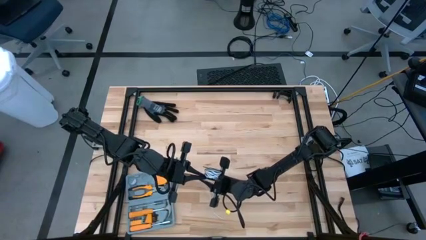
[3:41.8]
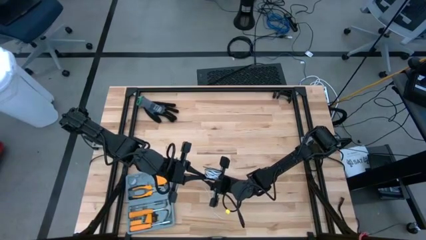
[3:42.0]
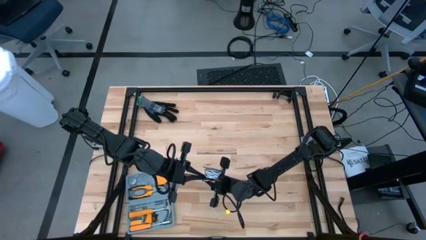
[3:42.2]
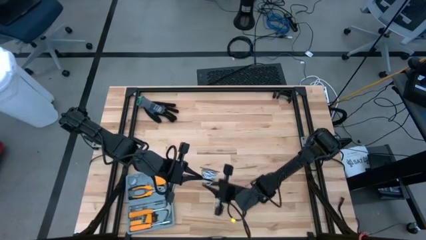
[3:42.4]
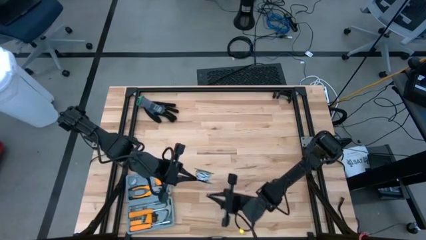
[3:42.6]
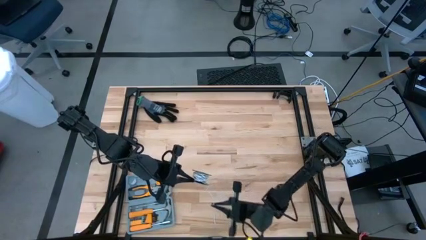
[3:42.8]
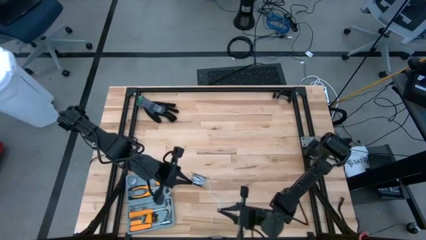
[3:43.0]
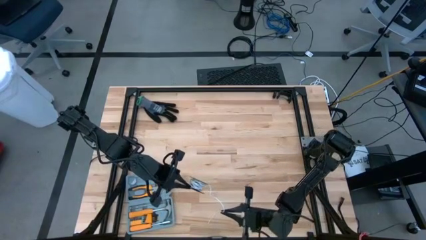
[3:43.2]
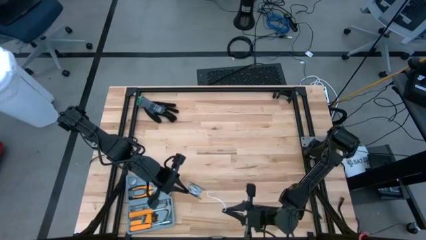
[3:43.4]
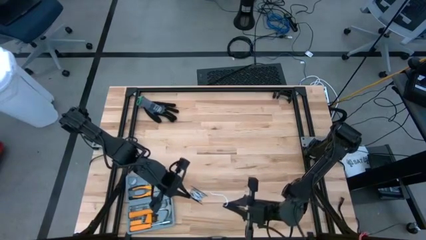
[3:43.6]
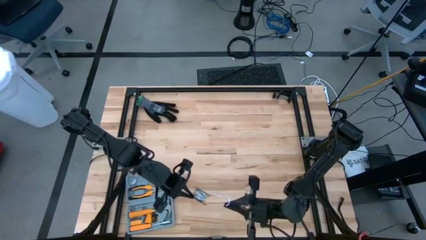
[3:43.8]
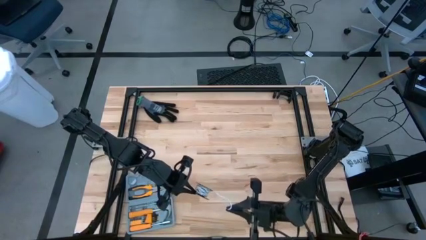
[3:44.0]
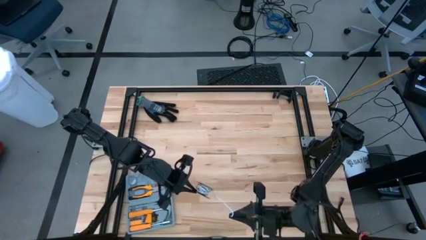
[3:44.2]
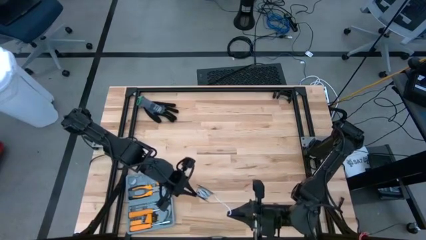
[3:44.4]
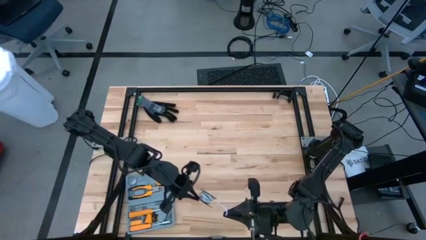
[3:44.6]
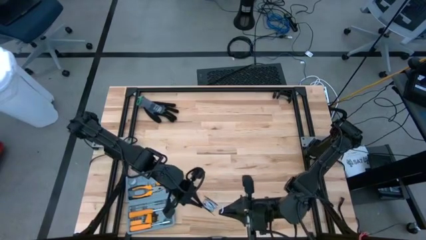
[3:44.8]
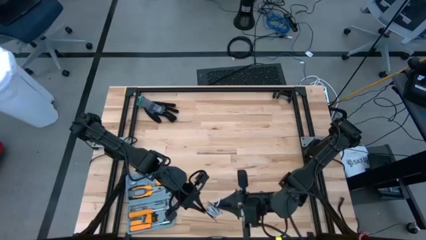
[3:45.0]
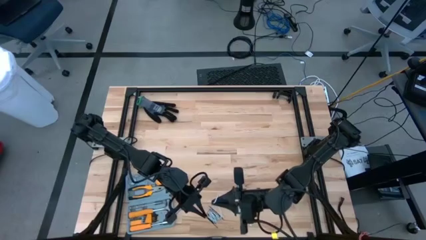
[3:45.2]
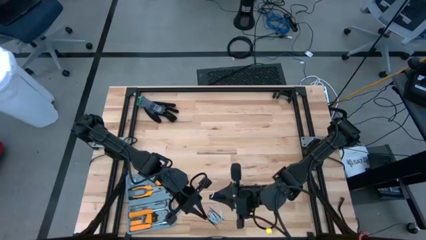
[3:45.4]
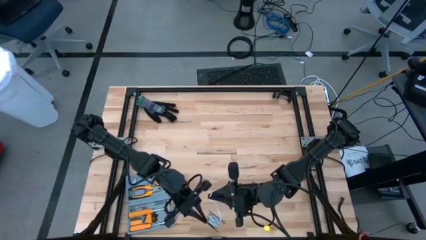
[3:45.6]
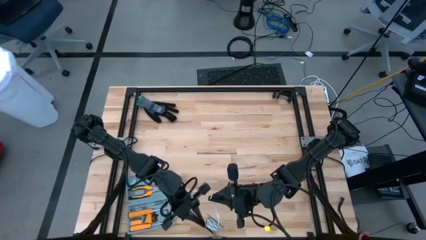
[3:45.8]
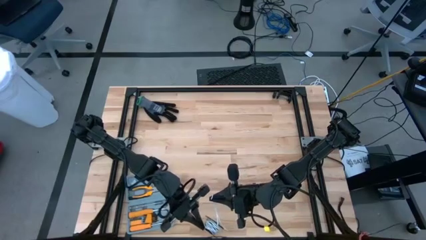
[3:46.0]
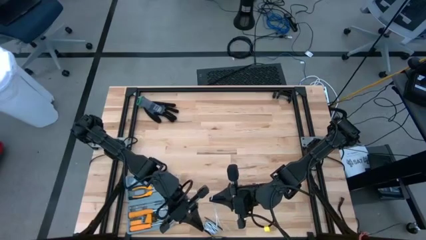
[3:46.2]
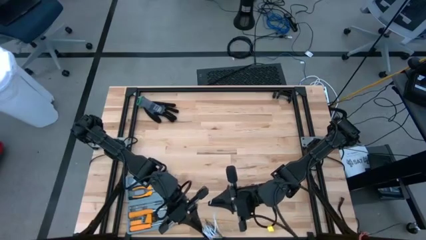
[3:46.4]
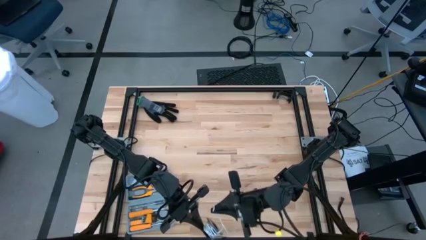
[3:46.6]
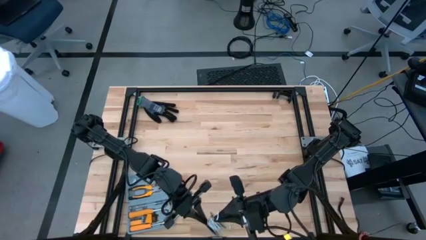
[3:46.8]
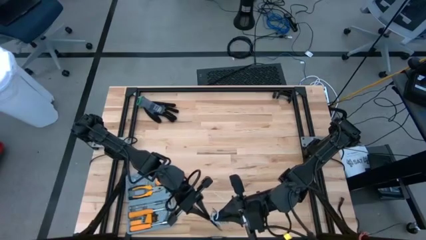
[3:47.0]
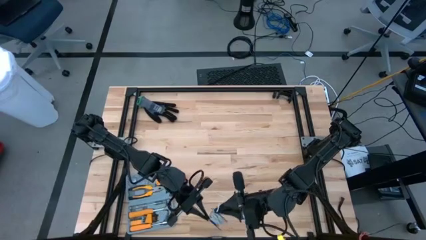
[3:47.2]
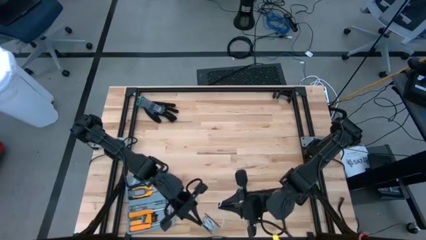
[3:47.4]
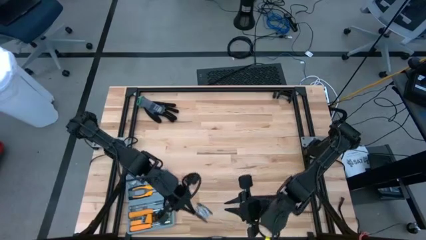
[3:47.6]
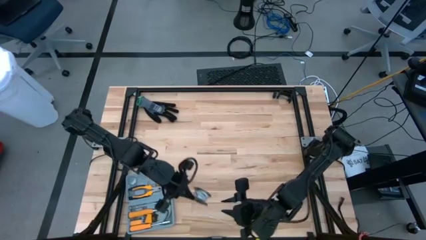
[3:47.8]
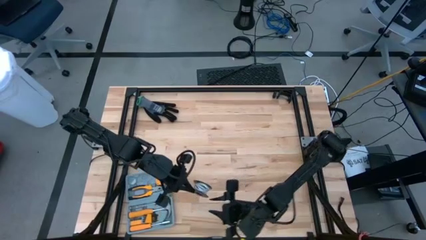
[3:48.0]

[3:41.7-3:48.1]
Task: Coil cords
Coil the white cable wire into the spool

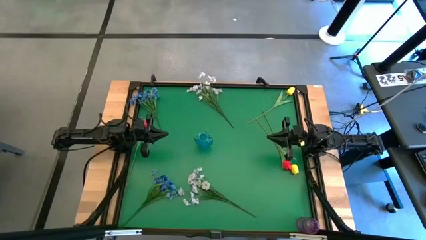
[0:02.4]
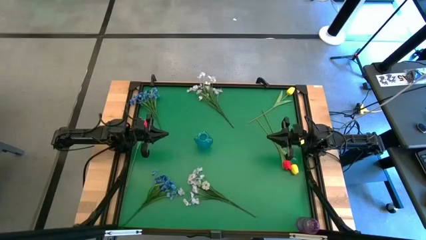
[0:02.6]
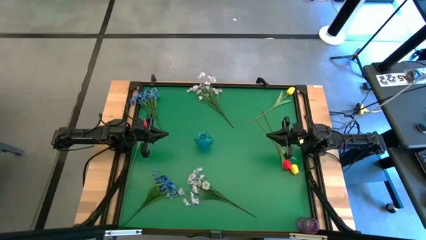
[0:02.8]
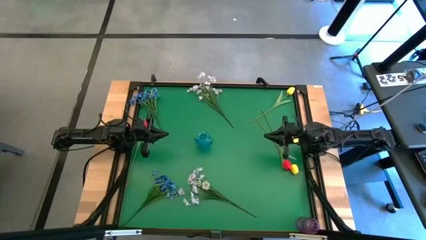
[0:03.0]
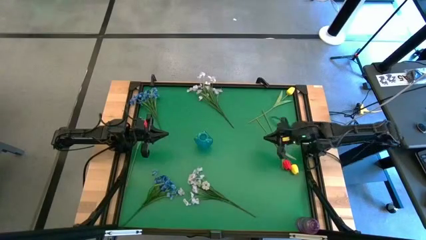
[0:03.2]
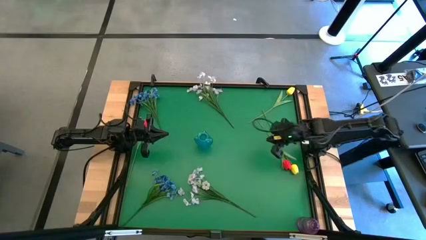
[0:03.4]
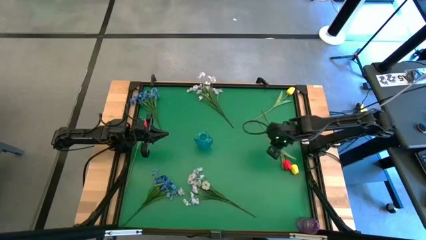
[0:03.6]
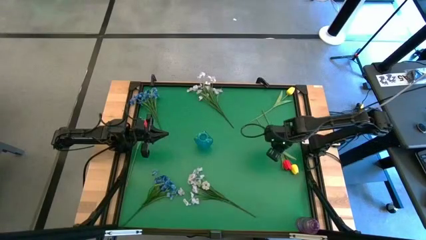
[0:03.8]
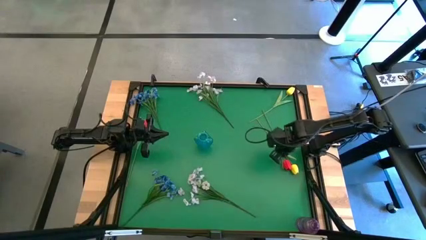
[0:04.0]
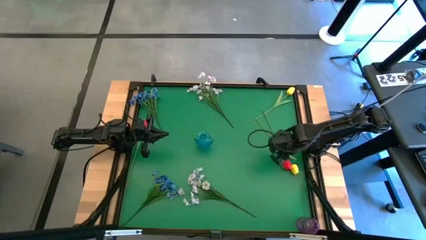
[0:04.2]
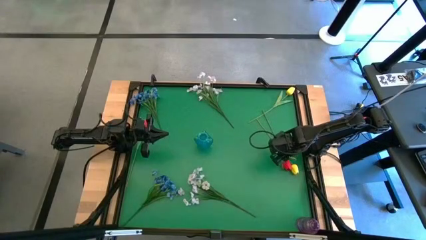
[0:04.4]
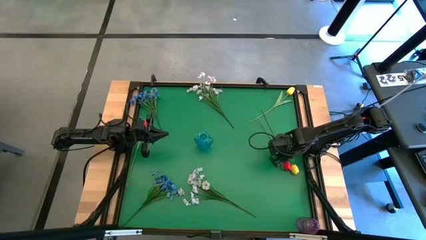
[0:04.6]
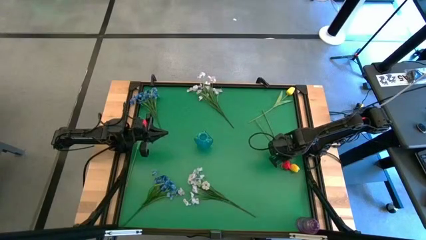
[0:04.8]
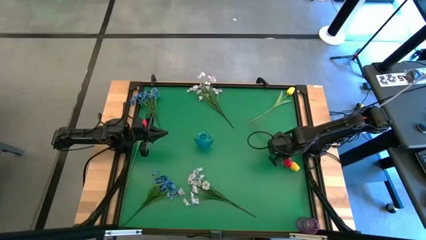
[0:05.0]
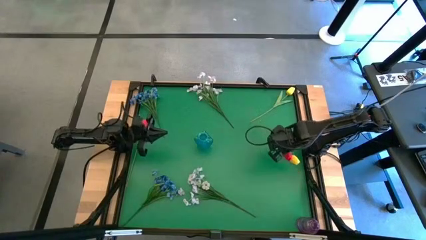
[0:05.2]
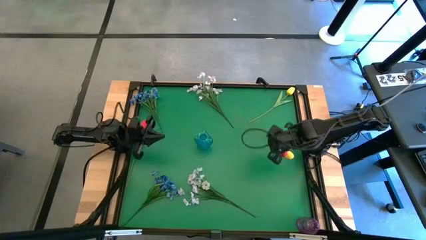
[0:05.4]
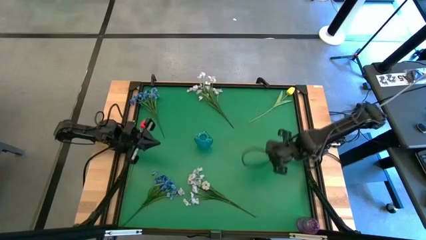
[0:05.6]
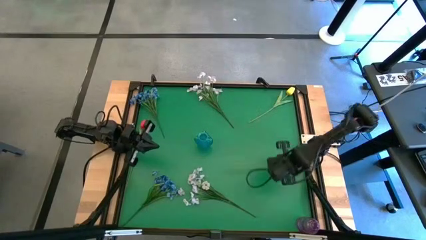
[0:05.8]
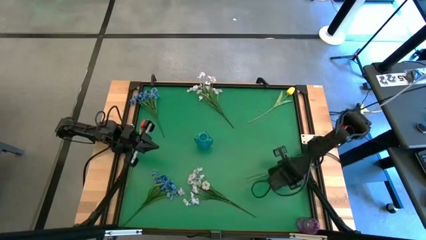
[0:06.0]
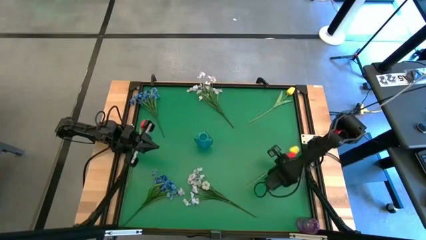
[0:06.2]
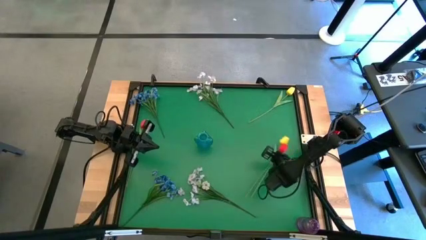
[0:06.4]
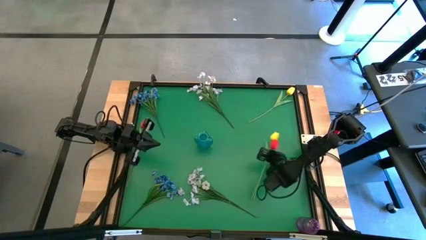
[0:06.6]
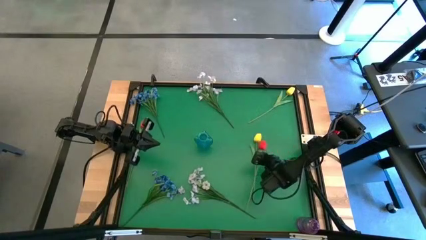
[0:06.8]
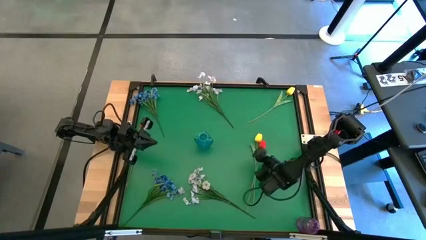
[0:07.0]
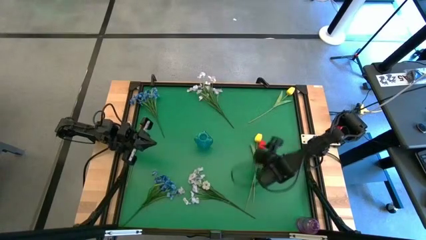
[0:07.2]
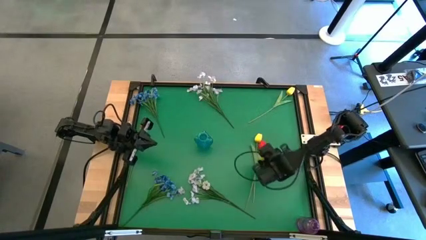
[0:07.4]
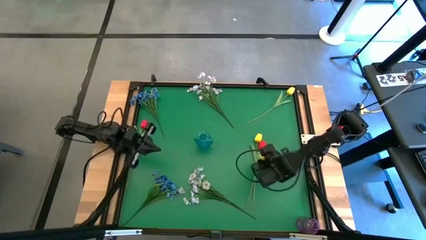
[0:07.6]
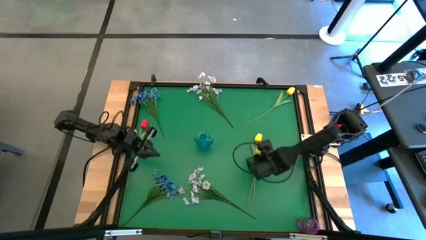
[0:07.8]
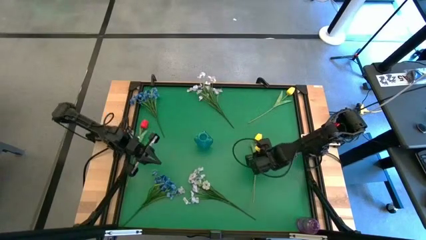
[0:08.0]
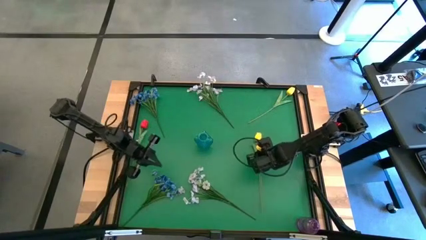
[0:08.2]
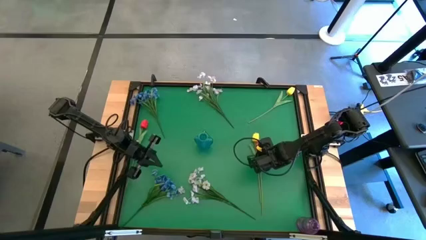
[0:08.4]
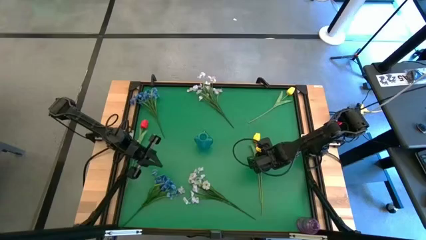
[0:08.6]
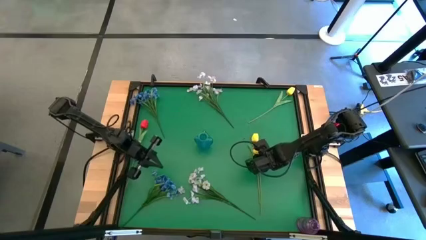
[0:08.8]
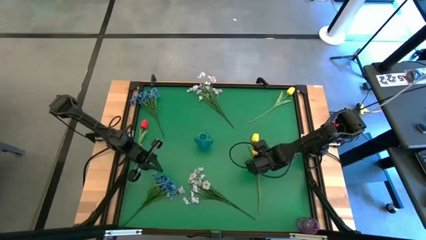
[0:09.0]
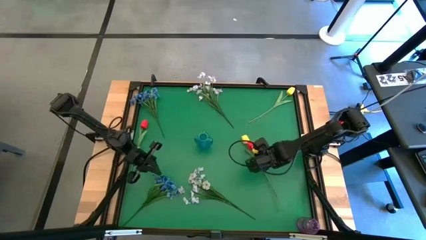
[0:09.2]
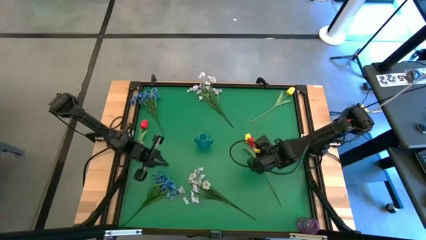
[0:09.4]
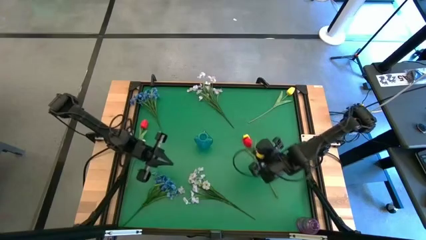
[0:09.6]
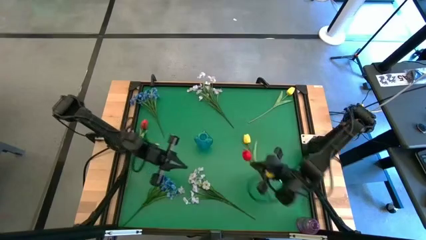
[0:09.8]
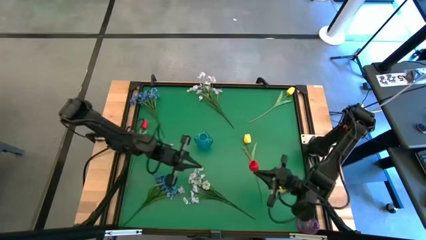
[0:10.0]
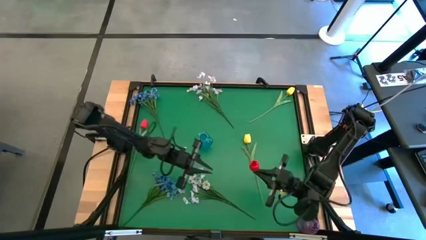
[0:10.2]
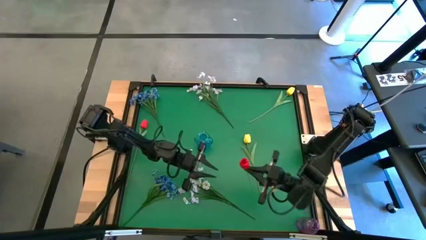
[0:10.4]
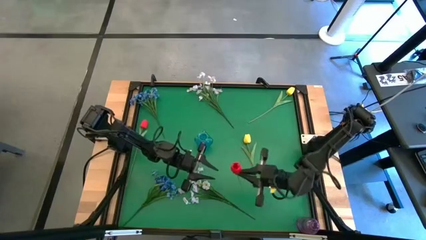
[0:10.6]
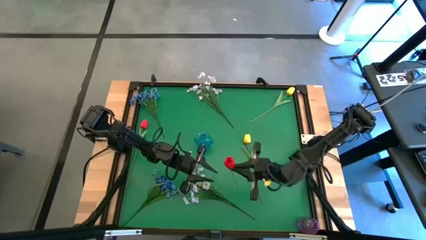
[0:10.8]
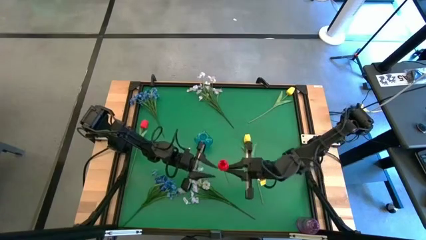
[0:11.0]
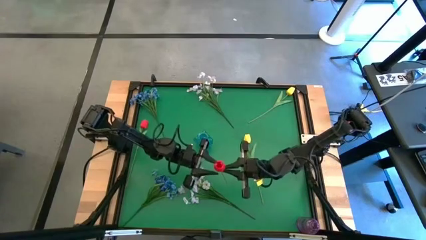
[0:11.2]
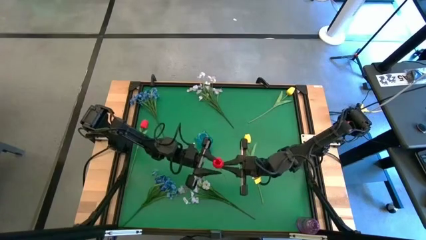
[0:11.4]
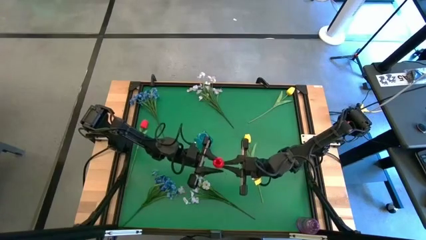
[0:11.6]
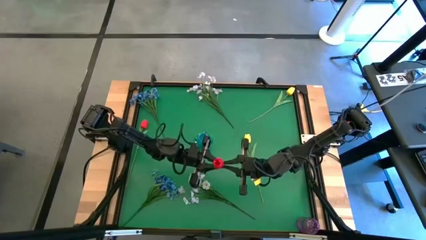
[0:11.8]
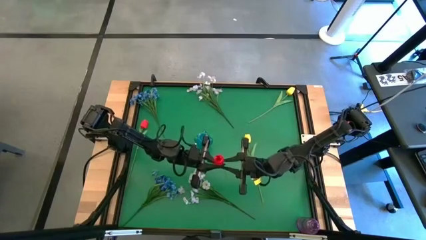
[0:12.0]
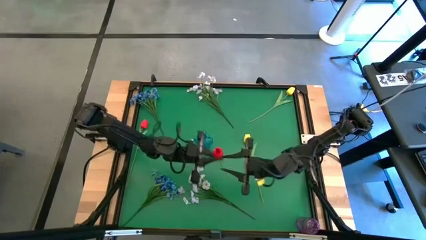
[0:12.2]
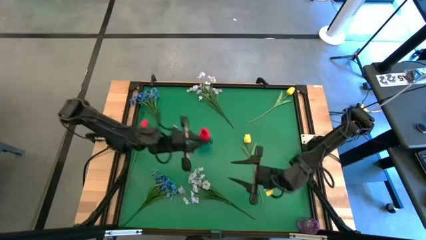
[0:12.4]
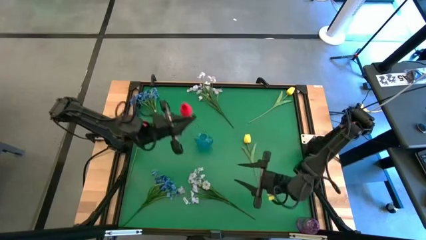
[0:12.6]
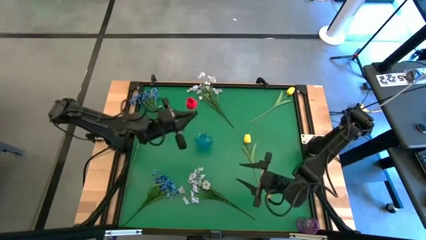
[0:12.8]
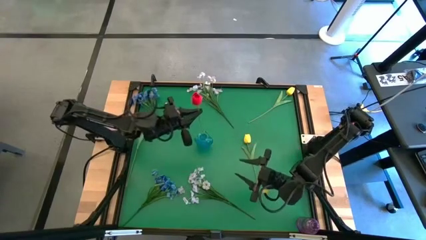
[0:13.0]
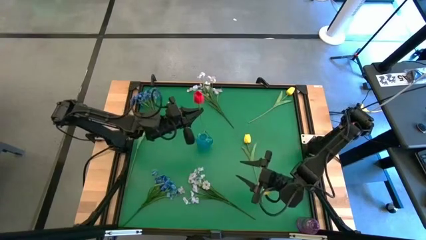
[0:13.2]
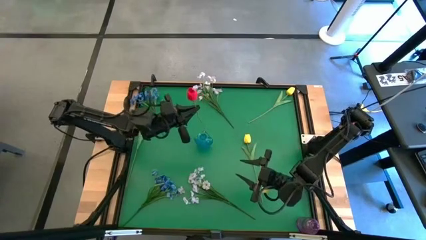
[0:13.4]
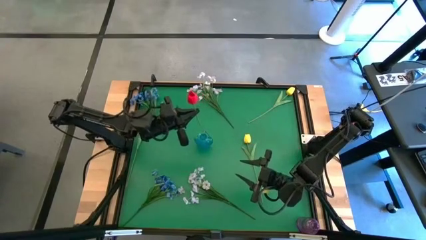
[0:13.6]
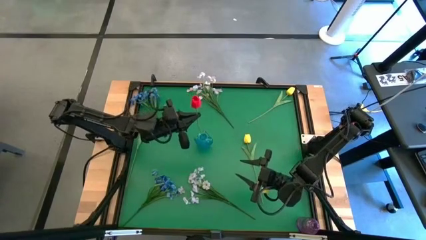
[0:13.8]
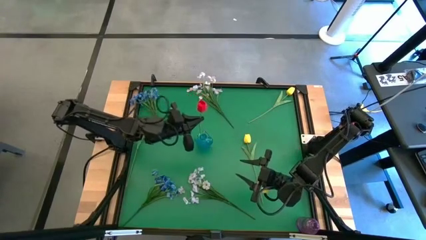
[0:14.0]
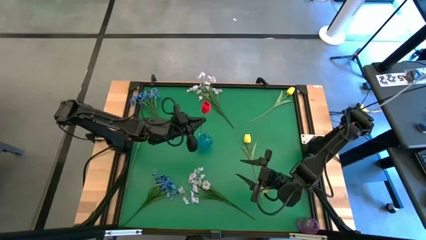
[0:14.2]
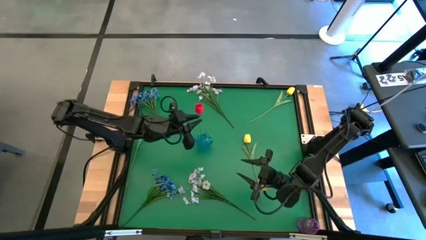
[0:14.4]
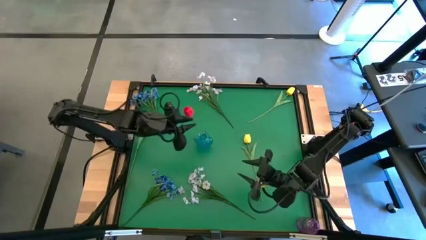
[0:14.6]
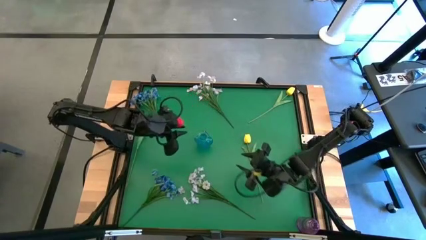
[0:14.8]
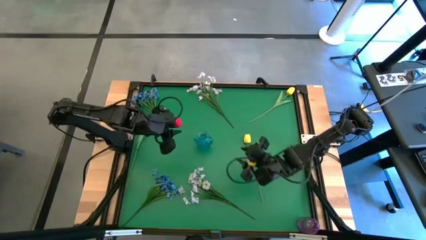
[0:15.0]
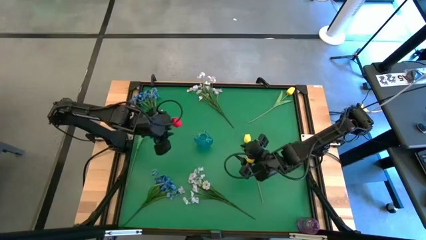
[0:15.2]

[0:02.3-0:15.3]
Task: Sort flowers into vase by color
Put the red flower into the blue vase
